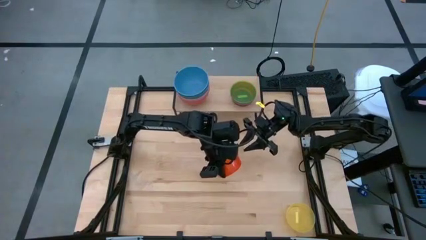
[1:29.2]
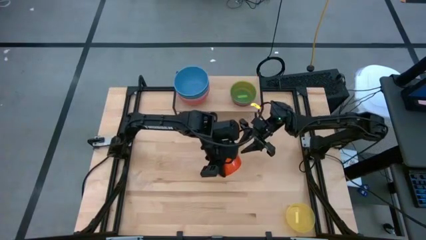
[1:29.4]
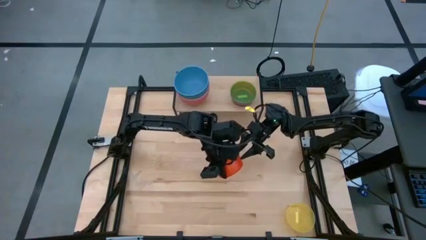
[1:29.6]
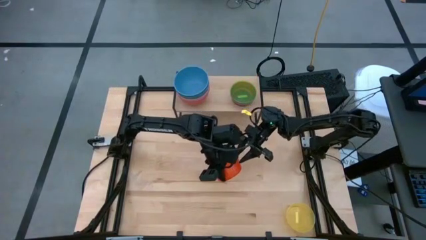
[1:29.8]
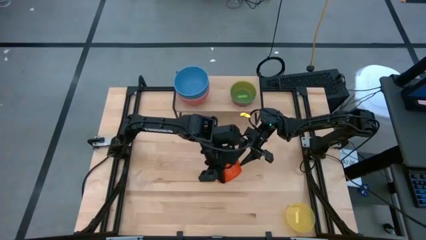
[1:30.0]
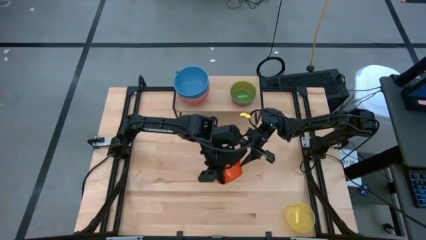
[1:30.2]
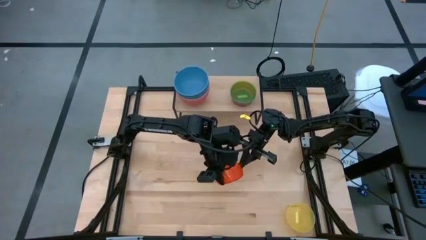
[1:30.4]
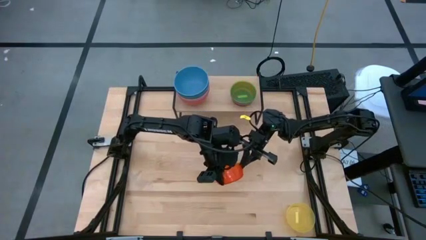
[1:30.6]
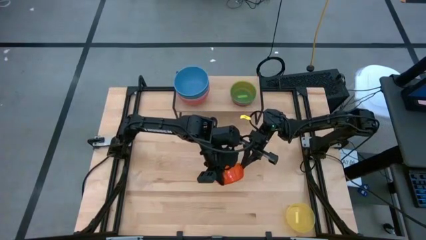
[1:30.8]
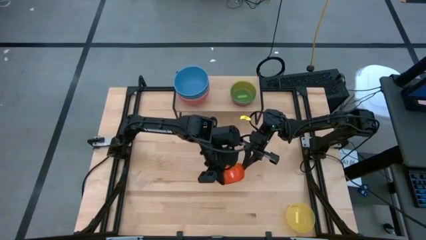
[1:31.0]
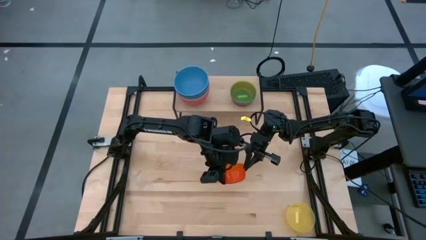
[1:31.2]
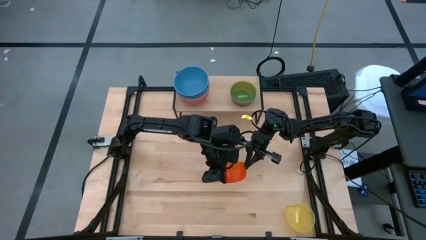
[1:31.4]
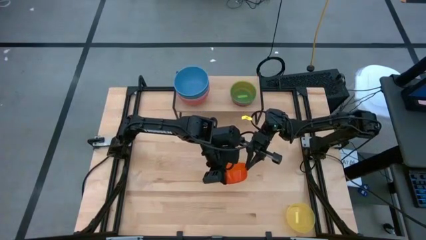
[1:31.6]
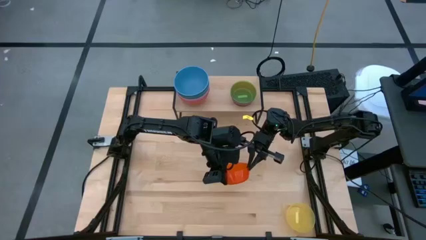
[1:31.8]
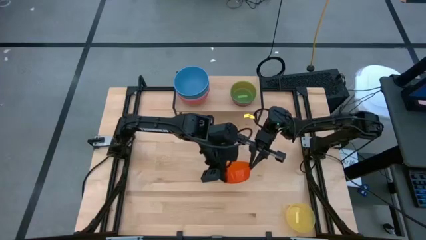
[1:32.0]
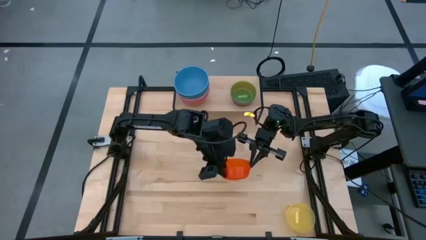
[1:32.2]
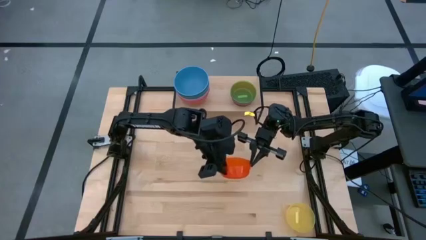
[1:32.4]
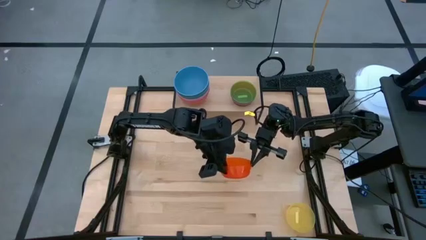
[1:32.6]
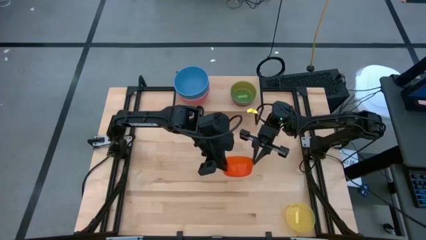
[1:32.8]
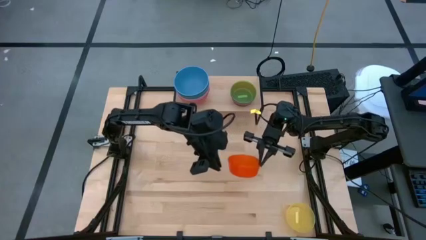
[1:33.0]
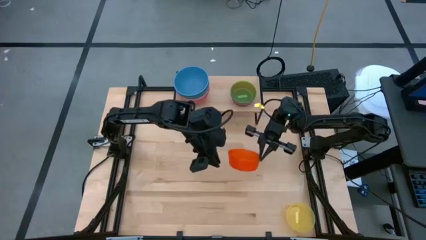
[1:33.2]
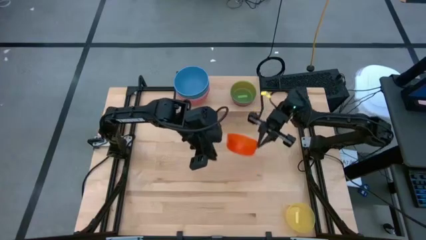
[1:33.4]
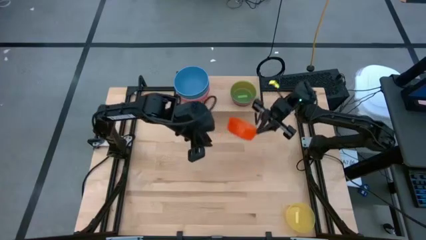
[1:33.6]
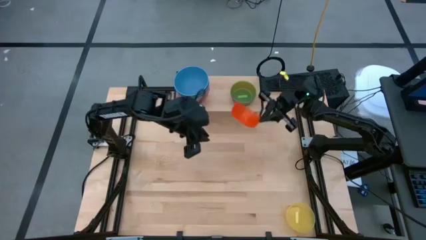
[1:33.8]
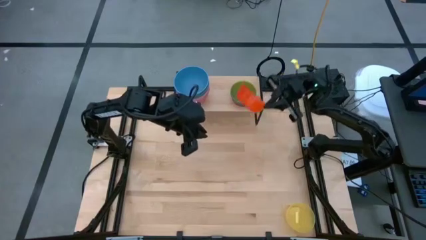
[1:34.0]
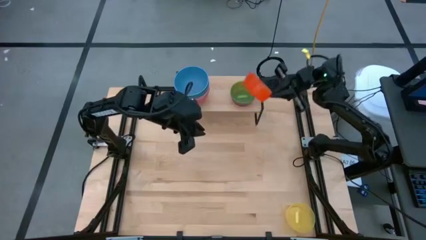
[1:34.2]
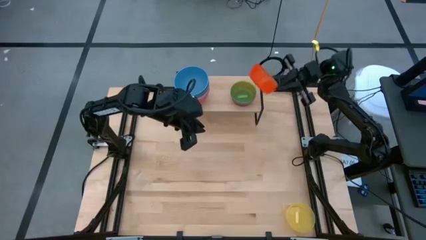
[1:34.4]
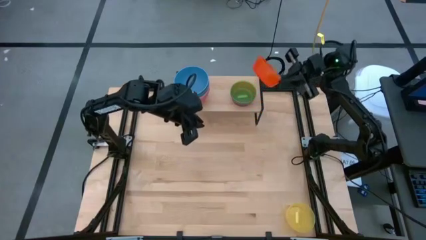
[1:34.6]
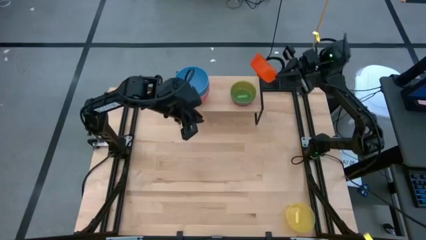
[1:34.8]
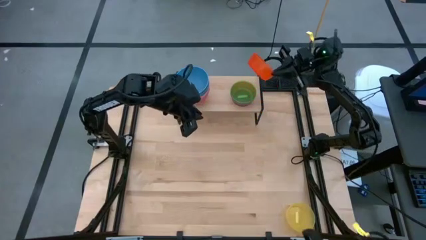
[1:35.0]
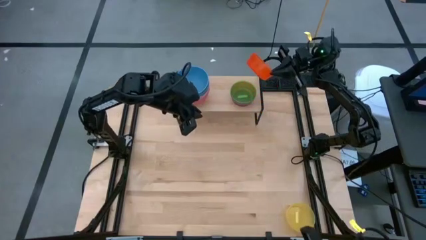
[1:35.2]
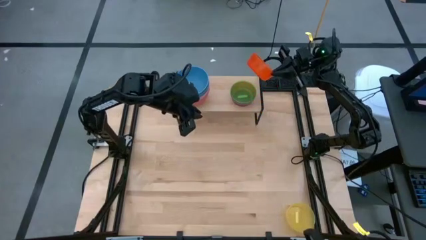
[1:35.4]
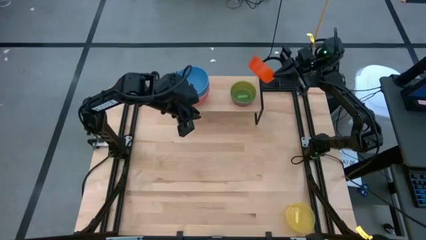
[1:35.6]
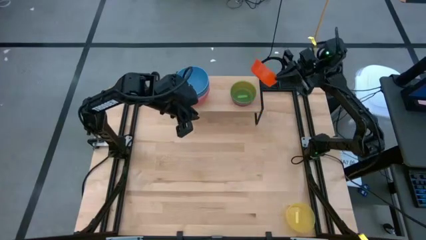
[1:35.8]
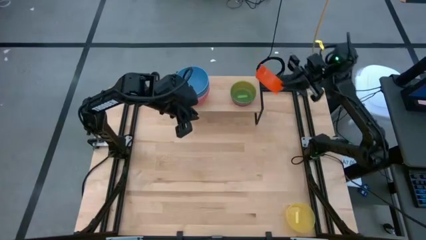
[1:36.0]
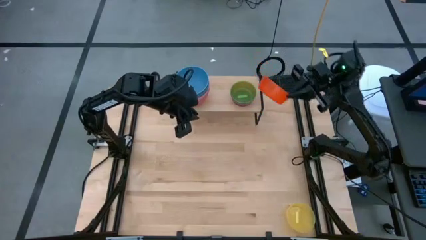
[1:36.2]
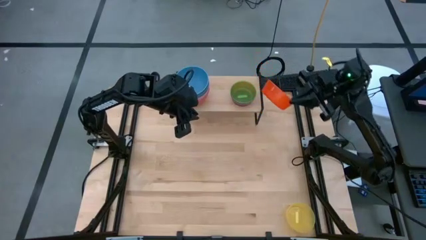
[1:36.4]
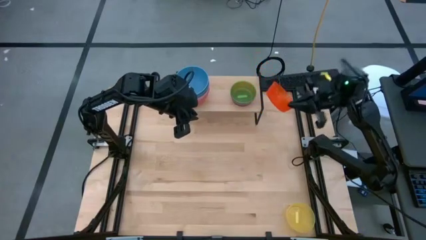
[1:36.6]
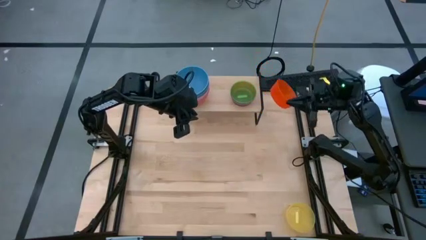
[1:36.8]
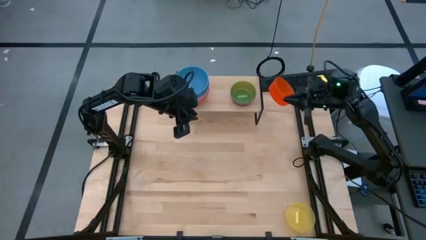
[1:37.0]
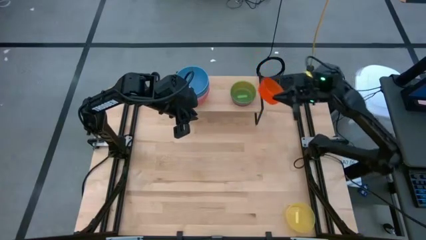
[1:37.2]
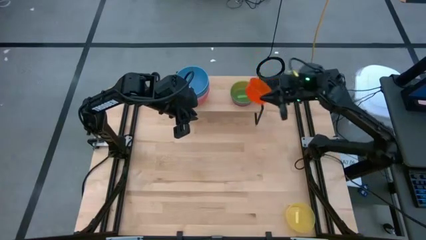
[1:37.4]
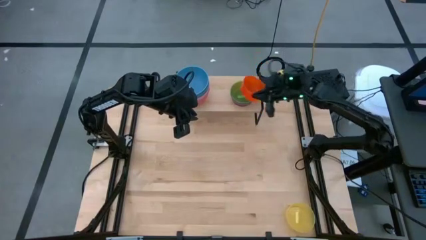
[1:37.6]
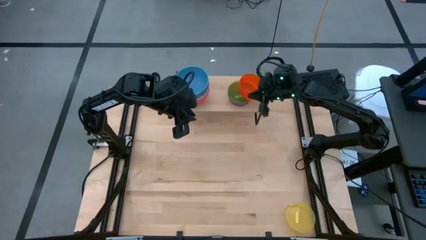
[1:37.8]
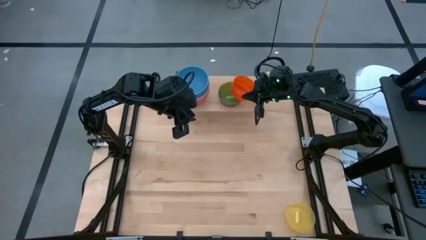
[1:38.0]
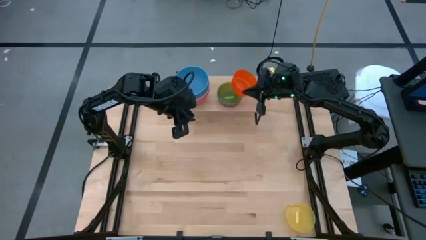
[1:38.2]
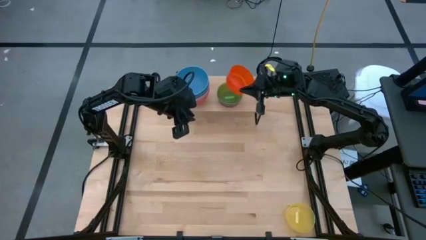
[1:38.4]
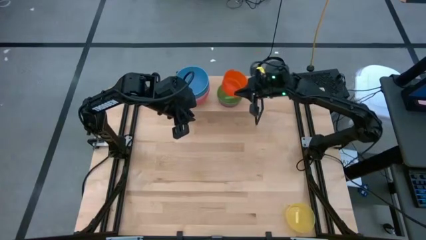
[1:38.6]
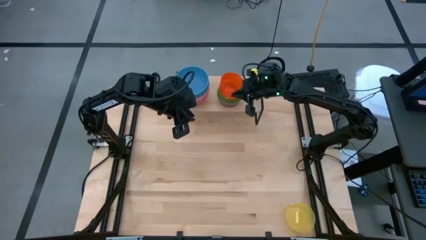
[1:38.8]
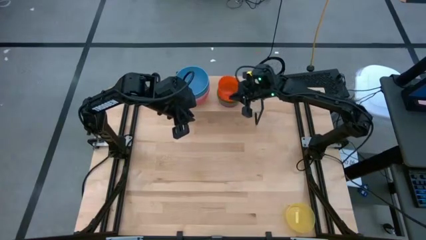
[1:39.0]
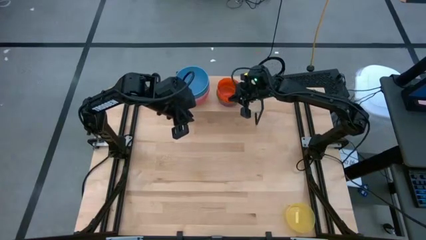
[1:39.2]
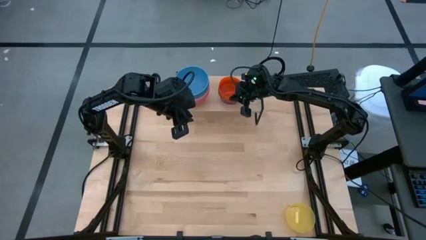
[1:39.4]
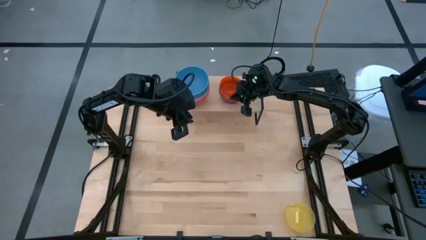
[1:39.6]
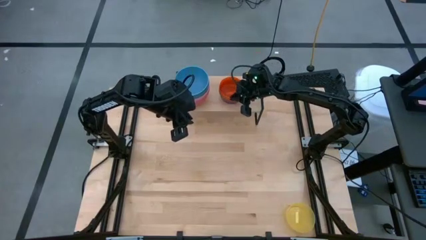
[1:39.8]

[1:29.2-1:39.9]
Task: Place and stack bowls onto a shelf
Stack the orange bowl on top of the green bowl on the shelf

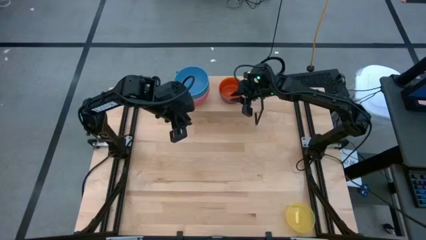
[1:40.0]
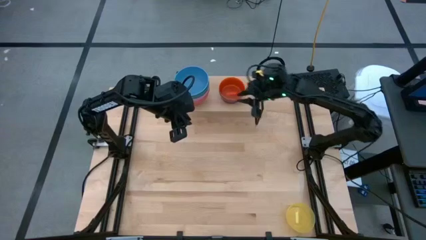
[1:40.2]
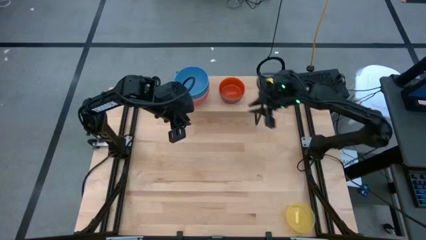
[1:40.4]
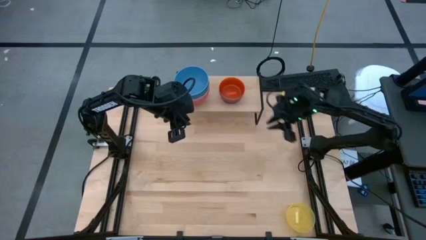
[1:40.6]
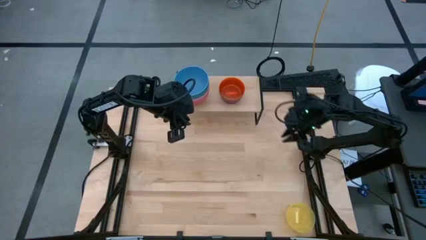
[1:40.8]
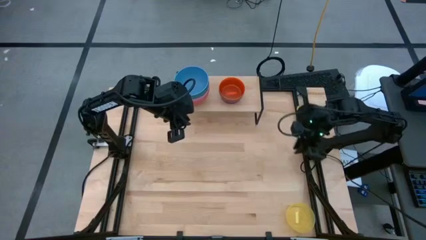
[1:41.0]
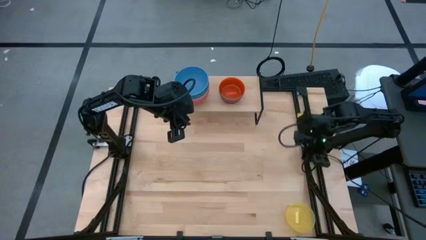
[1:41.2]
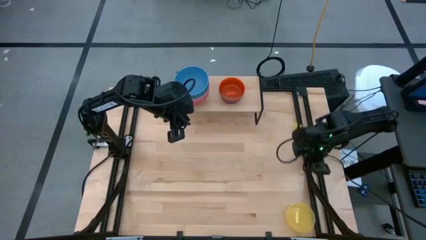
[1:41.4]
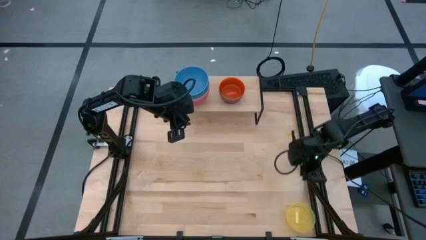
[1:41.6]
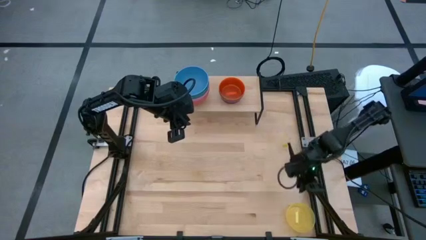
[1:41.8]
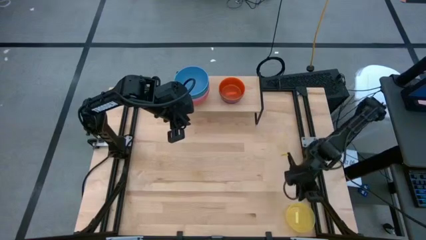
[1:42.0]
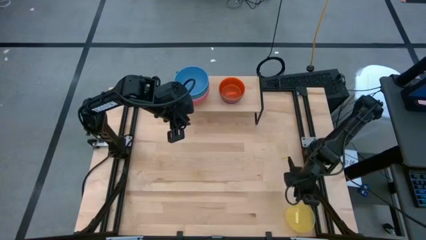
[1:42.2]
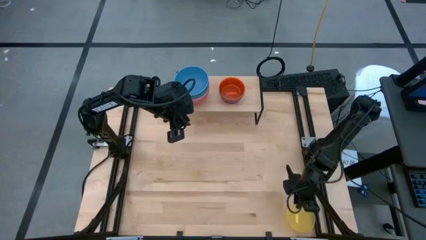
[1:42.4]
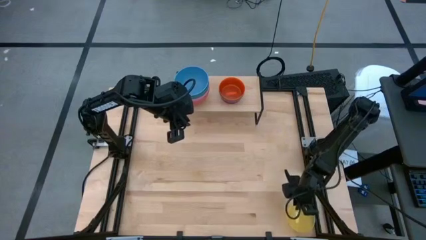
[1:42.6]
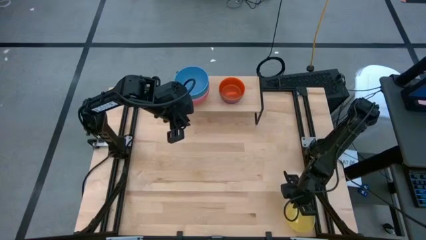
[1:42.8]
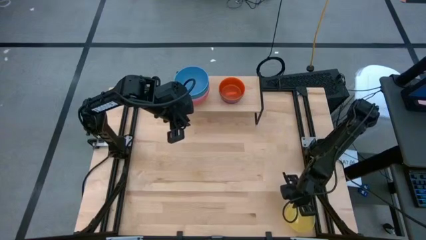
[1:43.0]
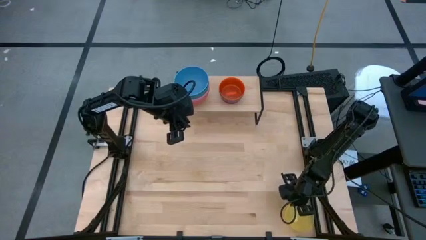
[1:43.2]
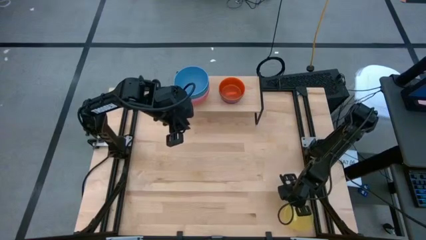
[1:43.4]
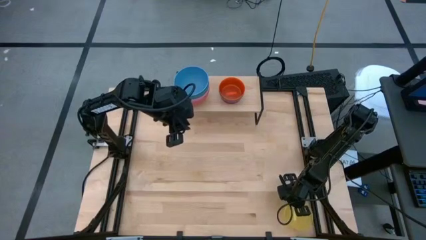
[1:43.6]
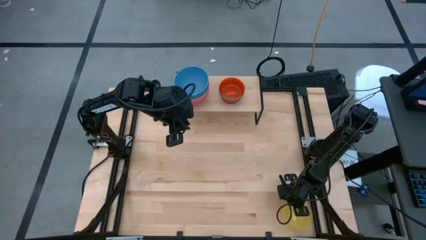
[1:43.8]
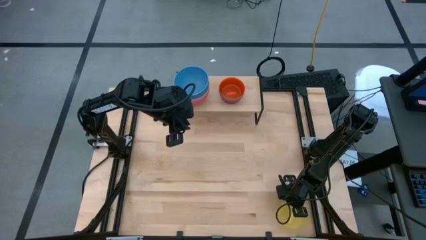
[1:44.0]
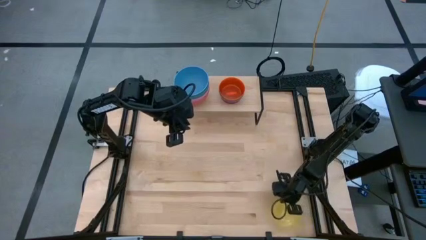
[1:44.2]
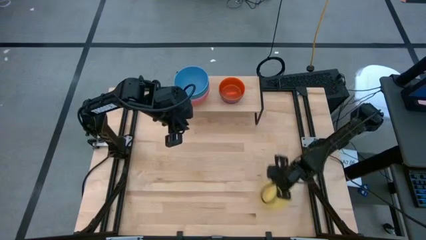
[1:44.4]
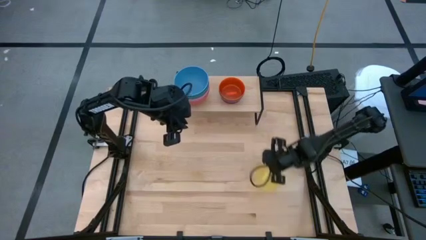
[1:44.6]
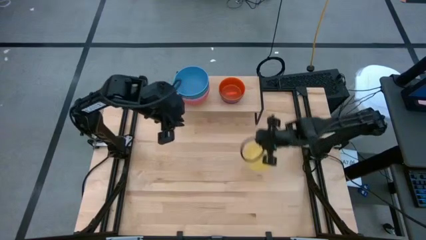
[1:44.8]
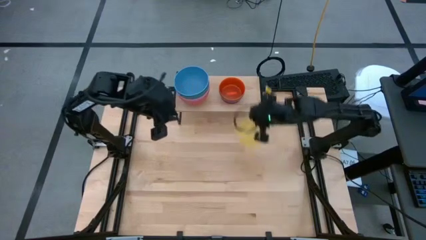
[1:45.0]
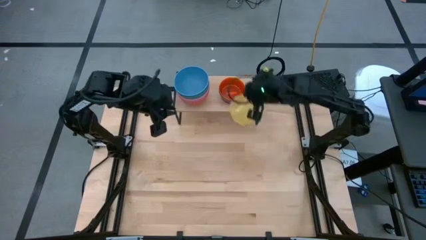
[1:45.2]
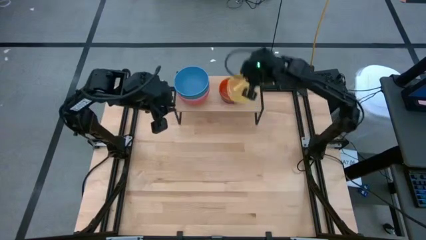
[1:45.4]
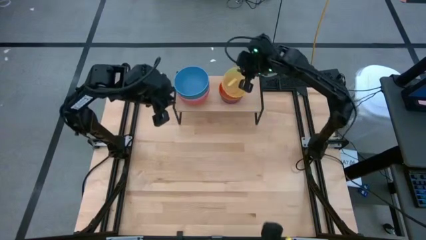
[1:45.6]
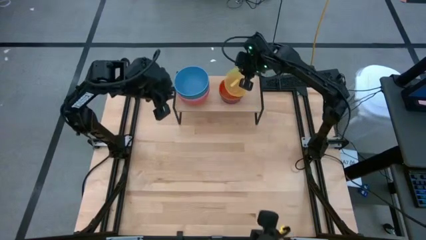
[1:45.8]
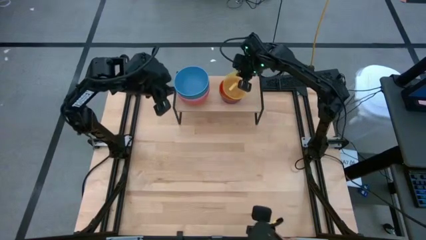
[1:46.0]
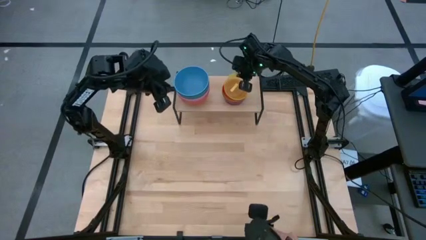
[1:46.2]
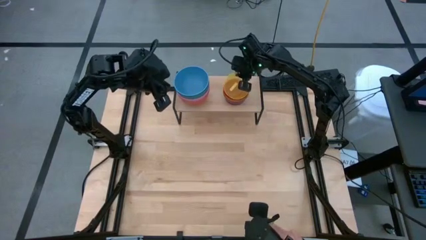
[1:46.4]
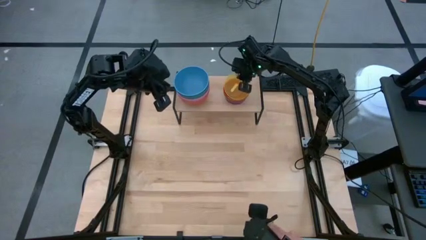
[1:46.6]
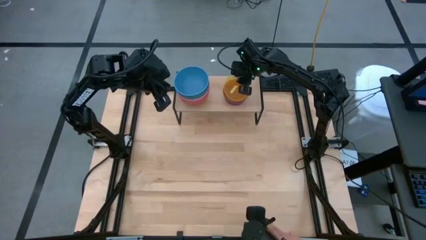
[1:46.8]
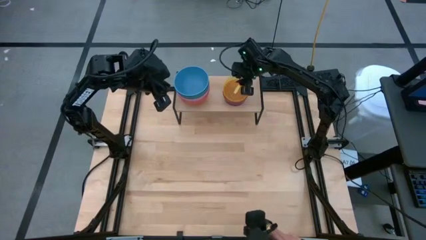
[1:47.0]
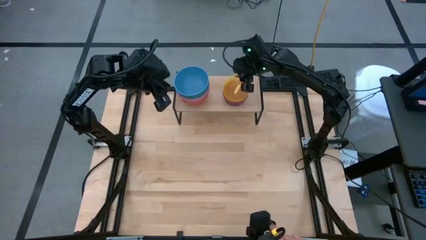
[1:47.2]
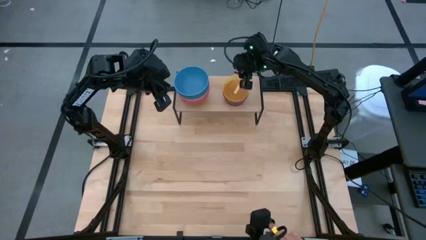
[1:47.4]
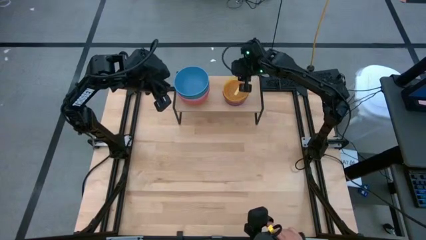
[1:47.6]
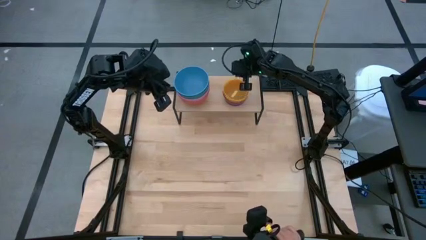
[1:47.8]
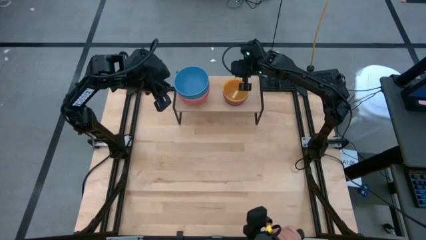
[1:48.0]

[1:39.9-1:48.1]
Stack the yellow bowl on top of the orange bowl on the shelf
